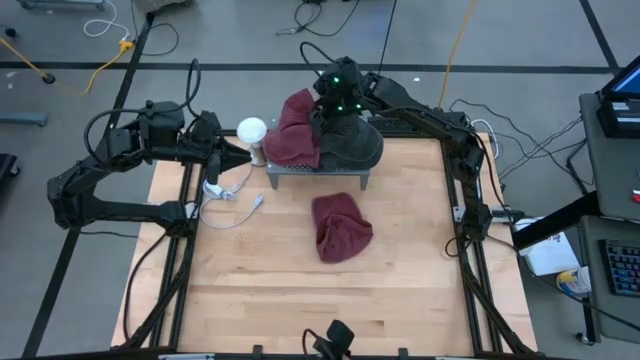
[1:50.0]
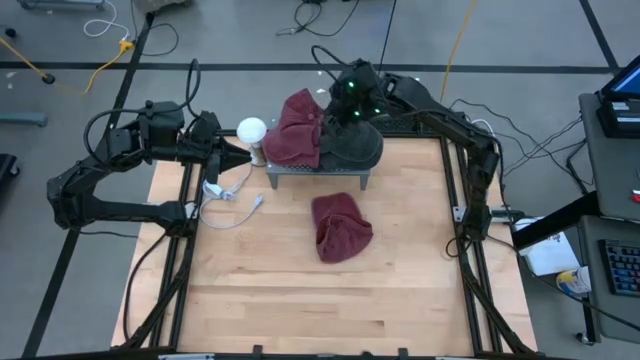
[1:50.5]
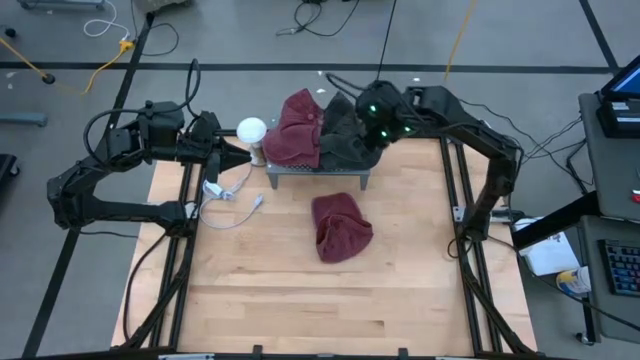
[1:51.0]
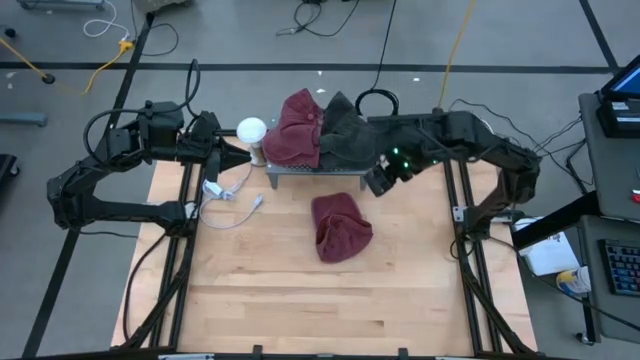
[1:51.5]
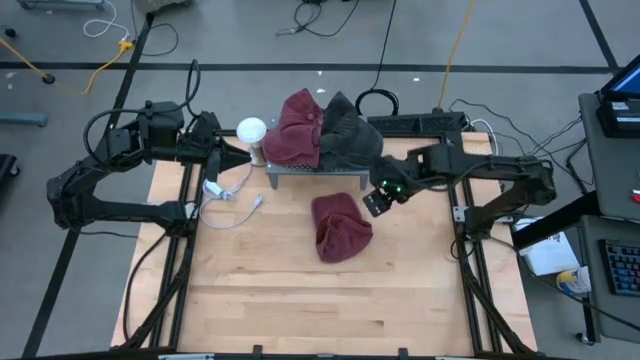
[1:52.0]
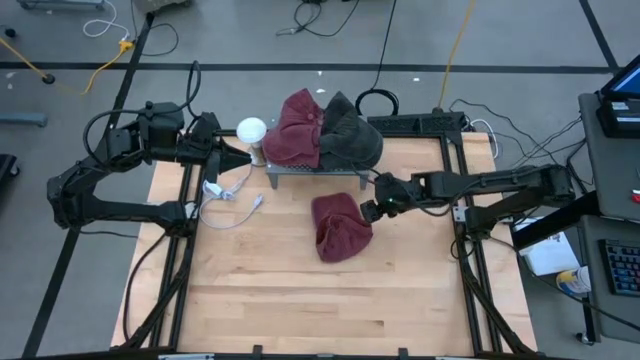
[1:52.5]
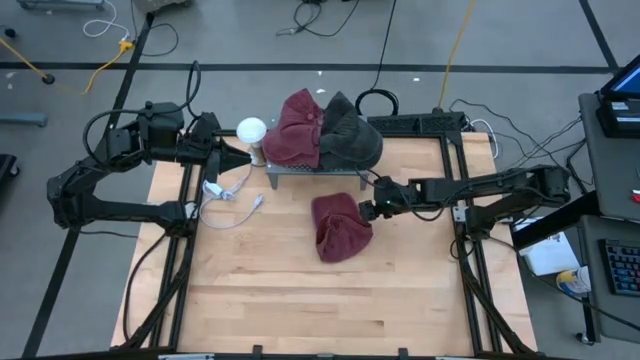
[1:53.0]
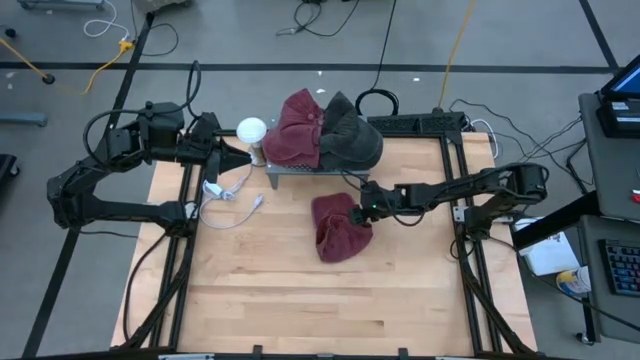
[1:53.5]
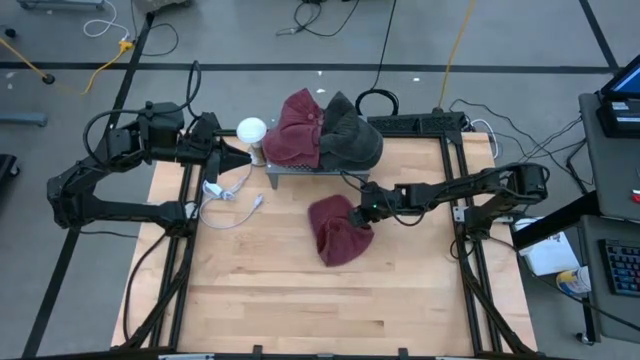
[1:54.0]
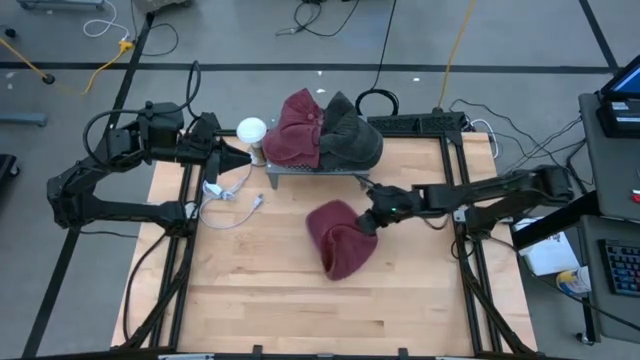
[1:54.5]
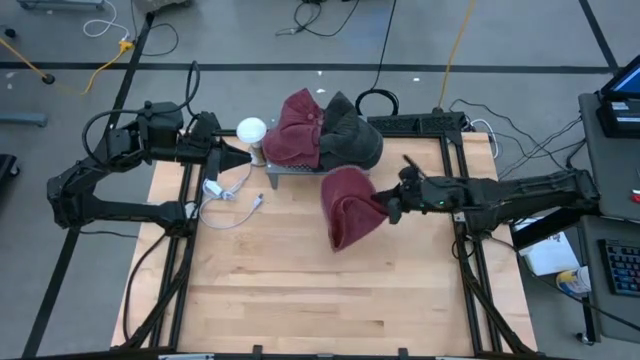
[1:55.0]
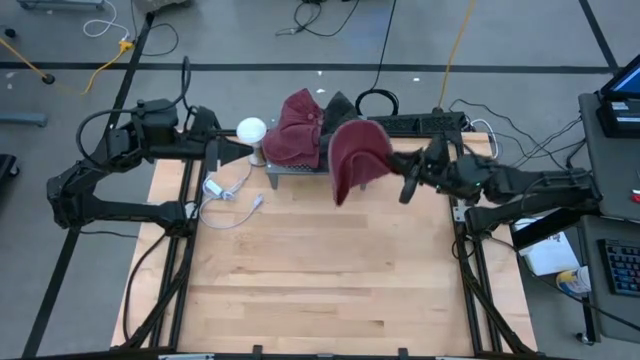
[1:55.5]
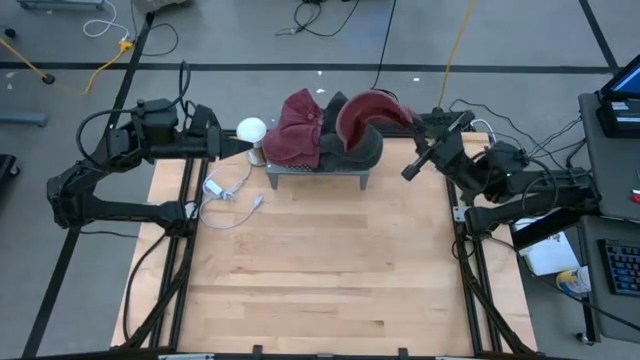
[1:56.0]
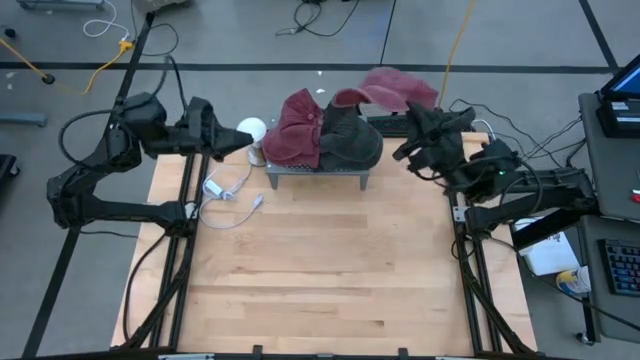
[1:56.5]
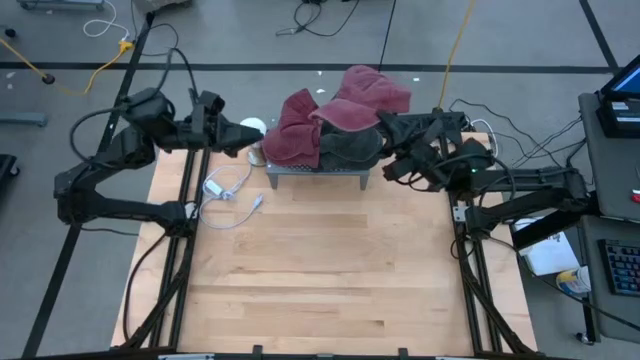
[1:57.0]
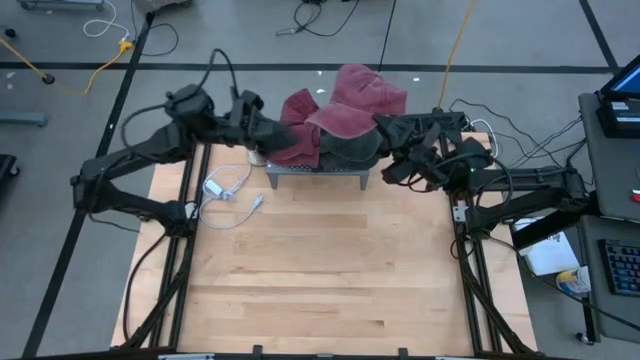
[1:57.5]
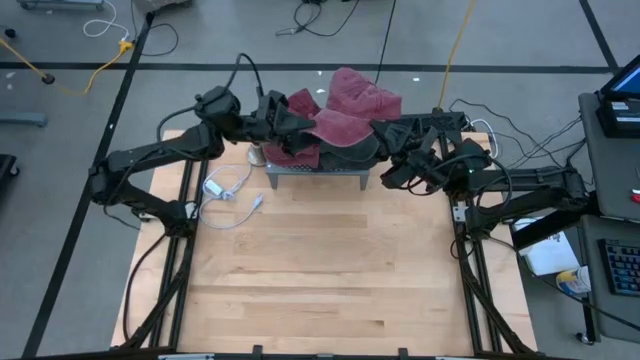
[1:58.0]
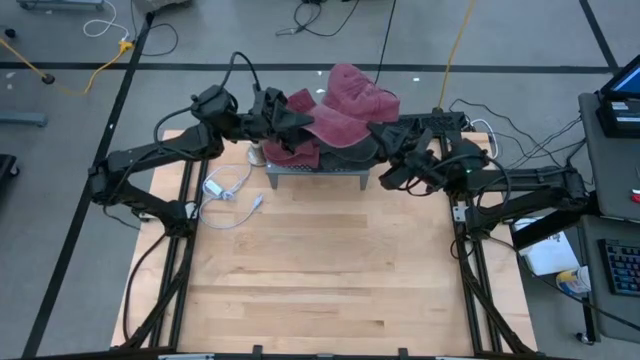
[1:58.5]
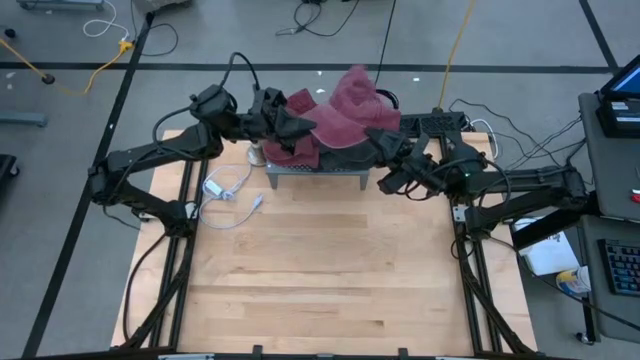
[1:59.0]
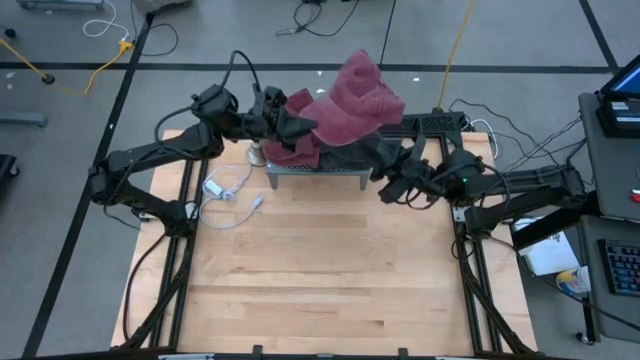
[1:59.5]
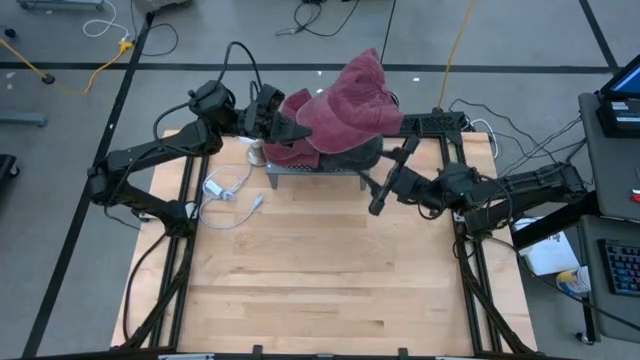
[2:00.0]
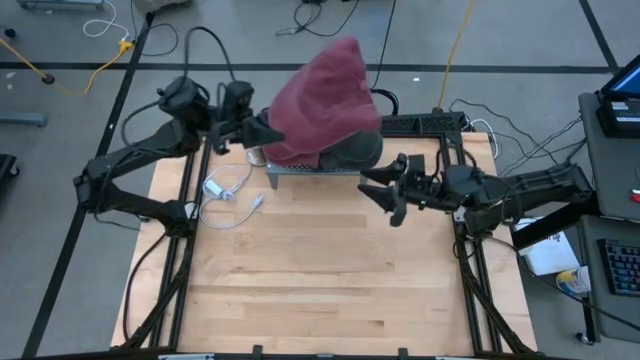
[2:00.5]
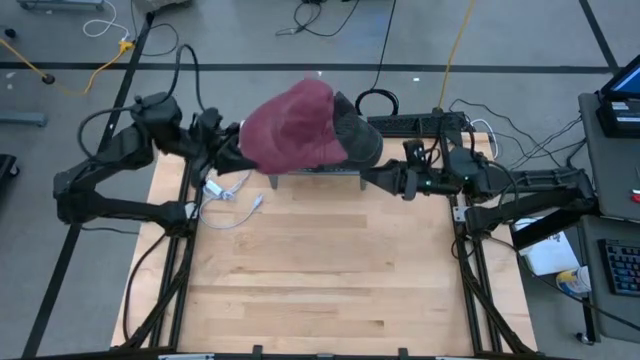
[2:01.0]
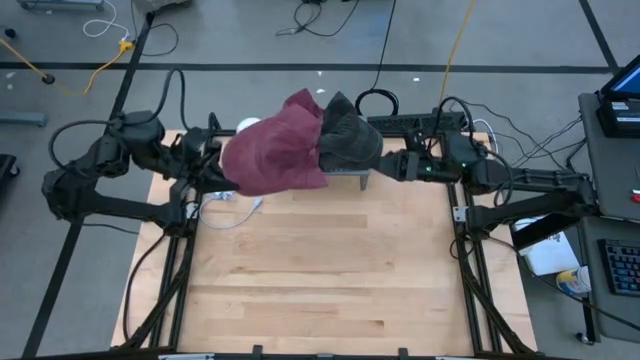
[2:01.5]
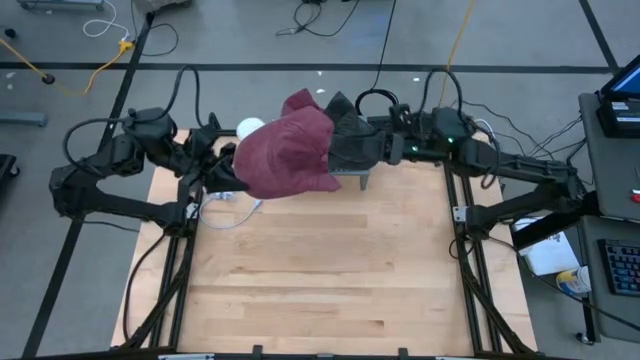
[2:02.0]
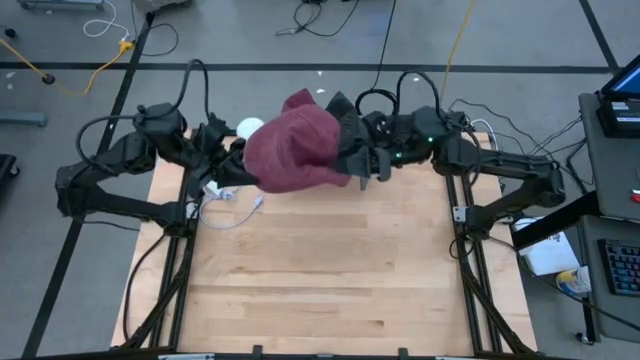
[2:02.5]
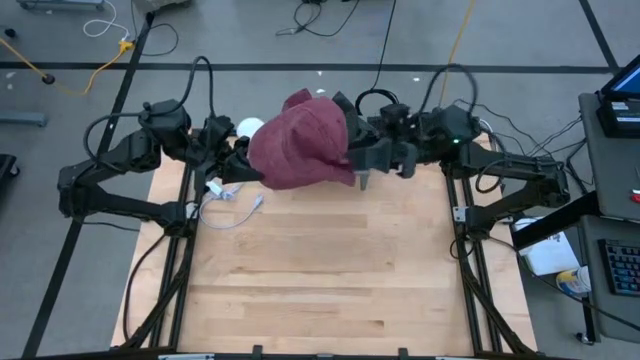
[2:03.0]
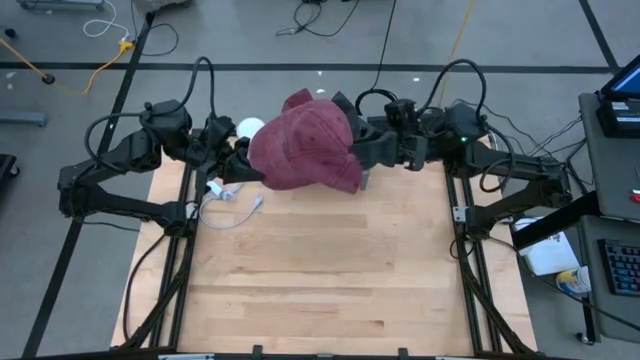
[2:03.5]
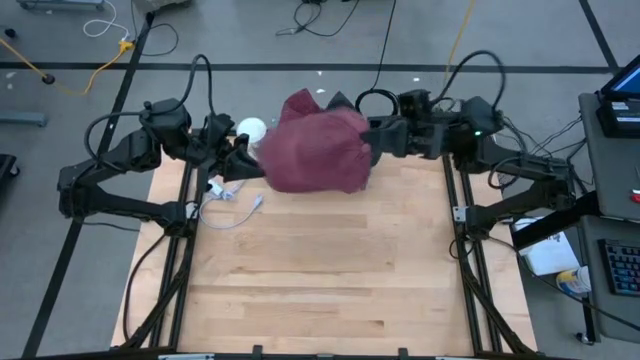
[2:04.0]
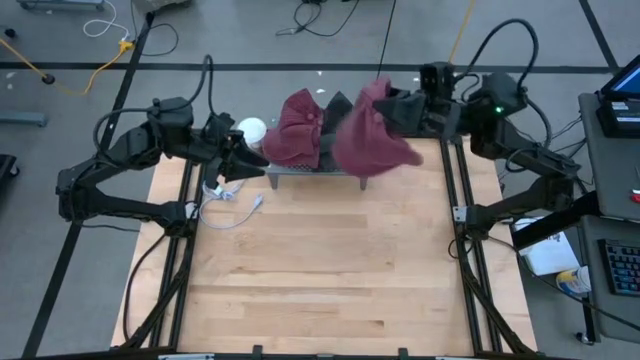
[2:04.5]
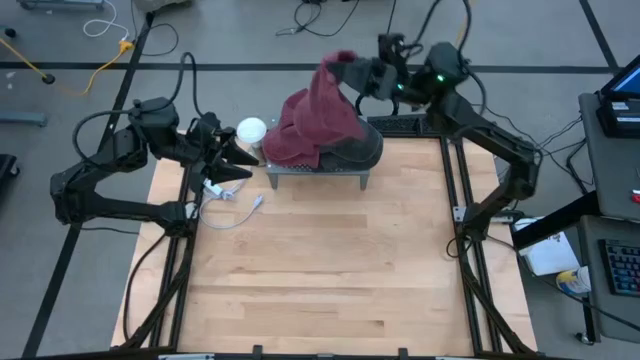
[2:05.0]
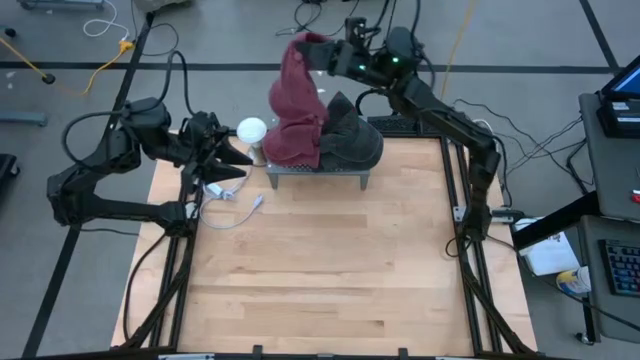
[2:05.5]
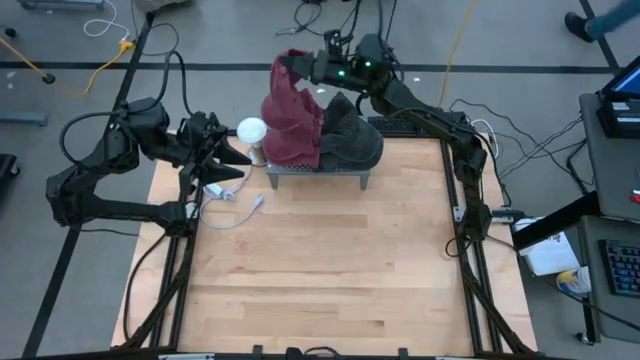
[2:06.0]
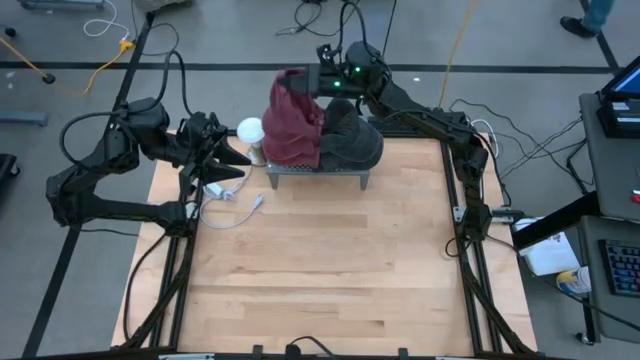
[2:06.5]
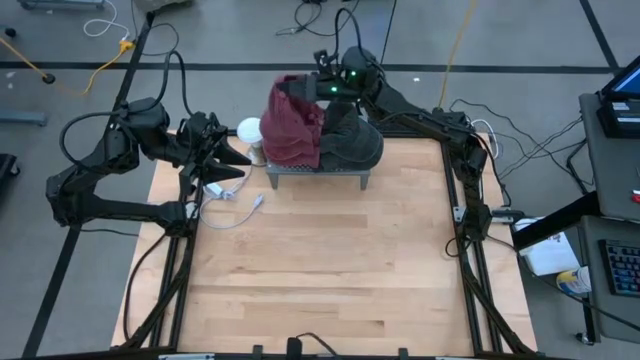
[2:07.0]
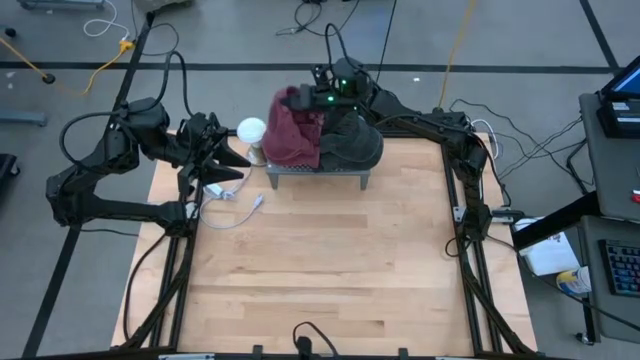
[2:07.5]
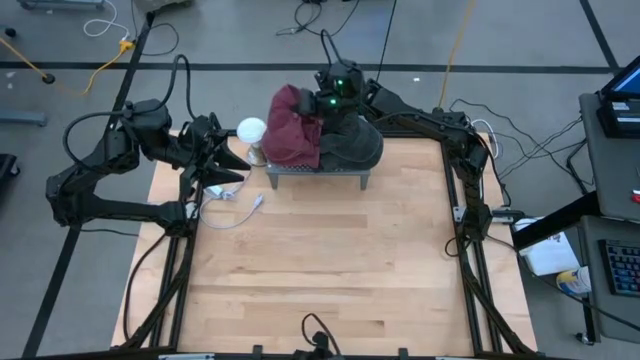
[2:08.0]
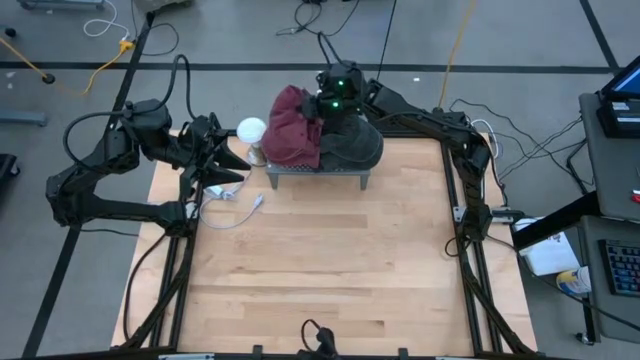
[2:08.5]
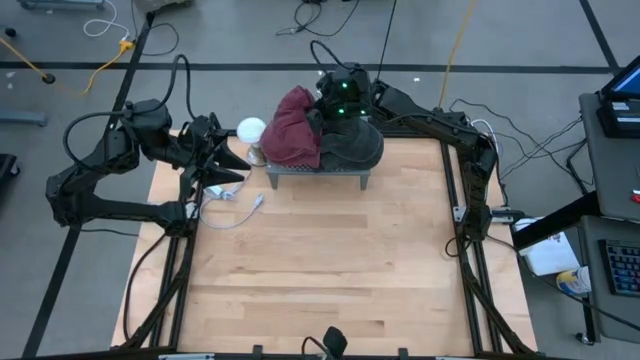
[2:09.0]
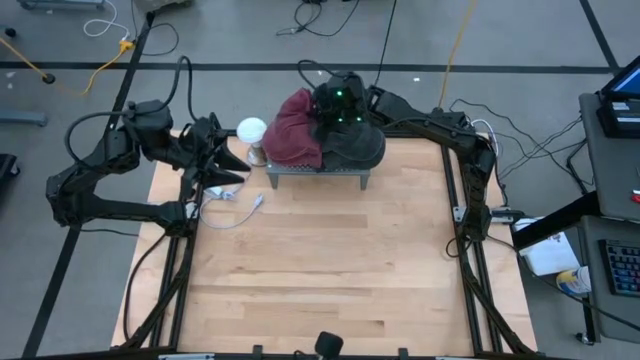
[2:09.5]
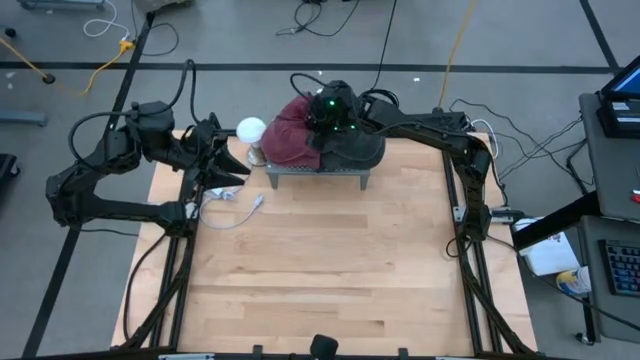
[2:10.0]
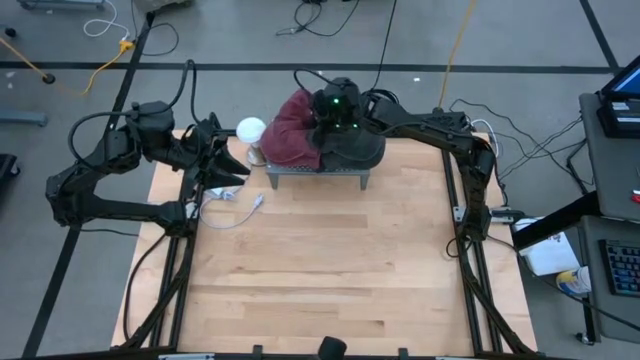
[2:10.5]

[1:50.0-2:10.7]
Task: Pick & Place hat
Stack the red cap on top of the red cap on the shelf
